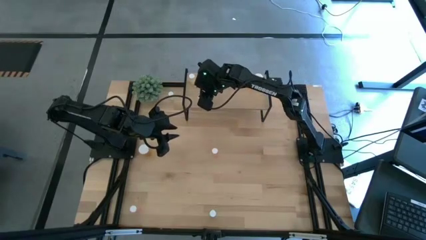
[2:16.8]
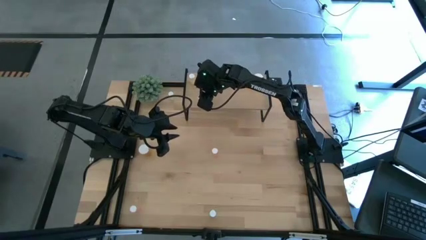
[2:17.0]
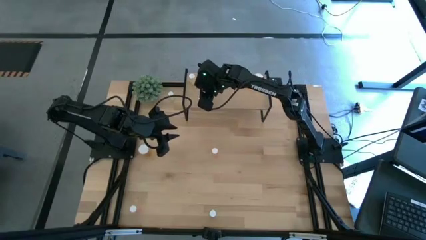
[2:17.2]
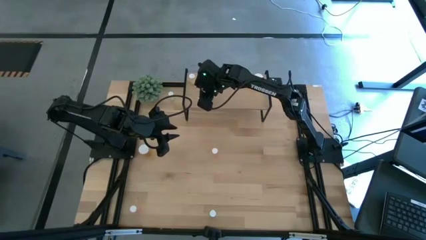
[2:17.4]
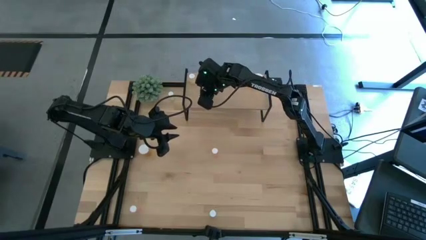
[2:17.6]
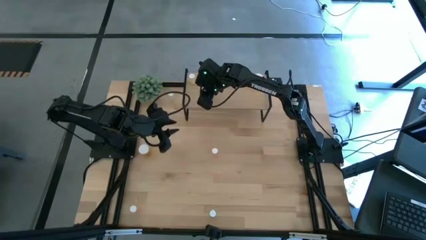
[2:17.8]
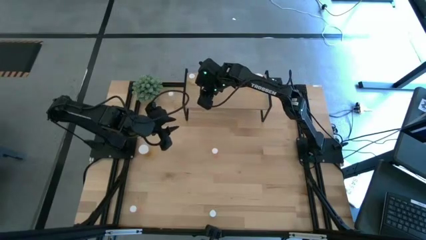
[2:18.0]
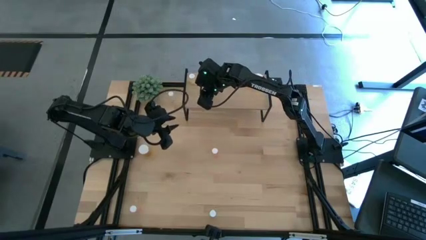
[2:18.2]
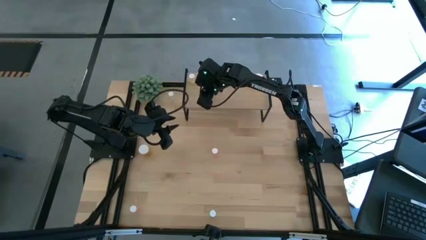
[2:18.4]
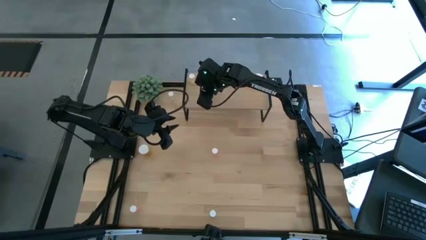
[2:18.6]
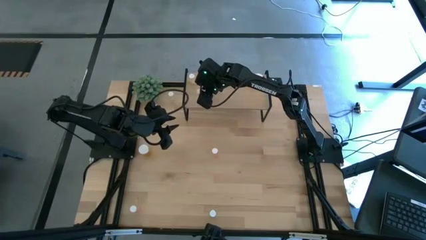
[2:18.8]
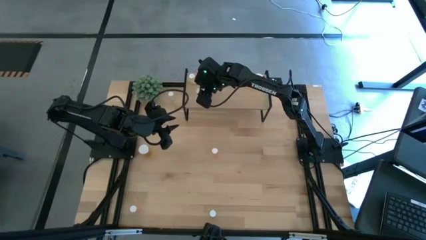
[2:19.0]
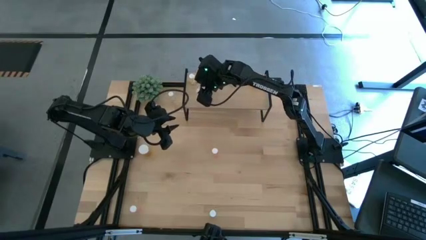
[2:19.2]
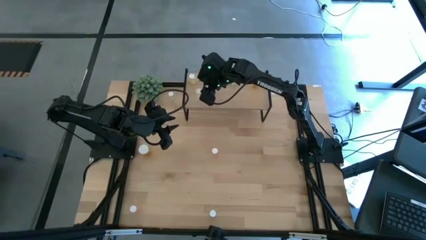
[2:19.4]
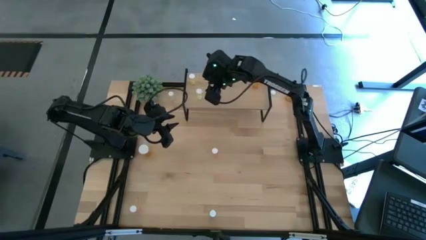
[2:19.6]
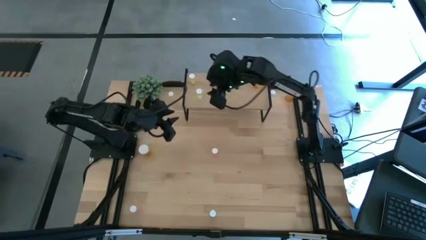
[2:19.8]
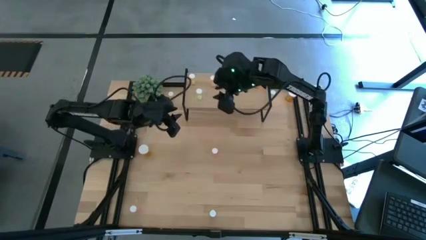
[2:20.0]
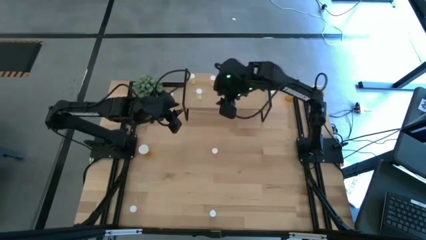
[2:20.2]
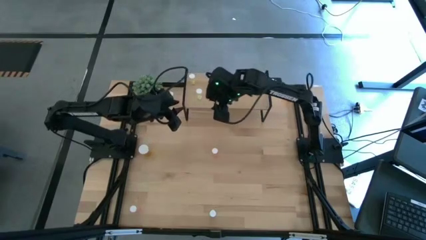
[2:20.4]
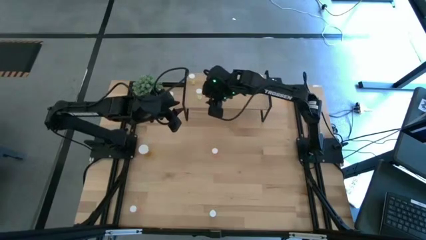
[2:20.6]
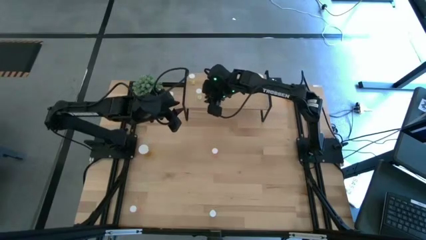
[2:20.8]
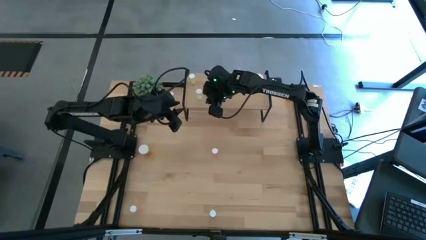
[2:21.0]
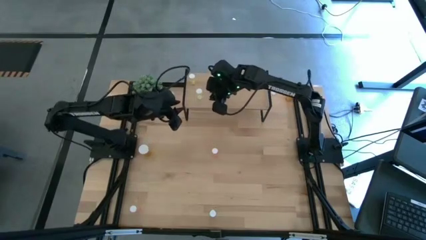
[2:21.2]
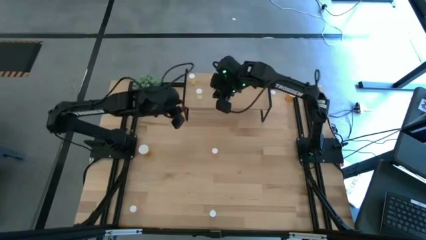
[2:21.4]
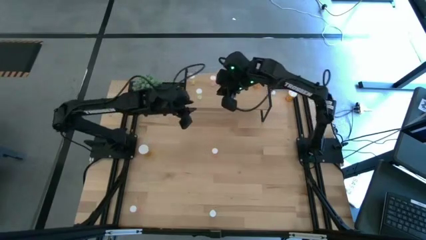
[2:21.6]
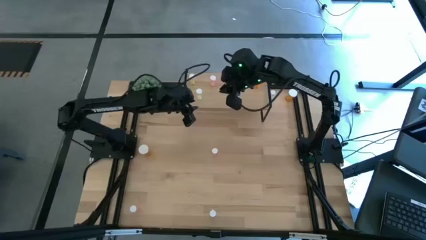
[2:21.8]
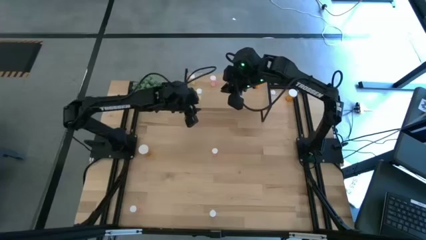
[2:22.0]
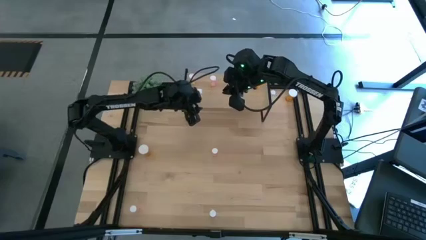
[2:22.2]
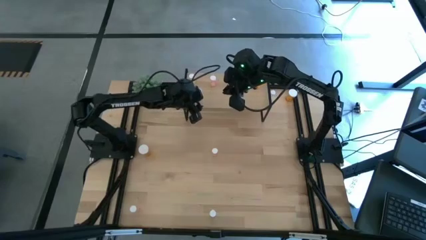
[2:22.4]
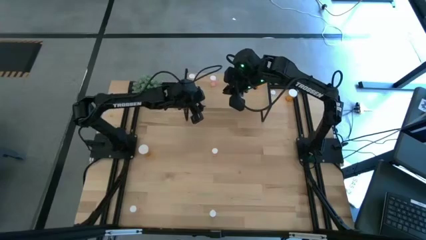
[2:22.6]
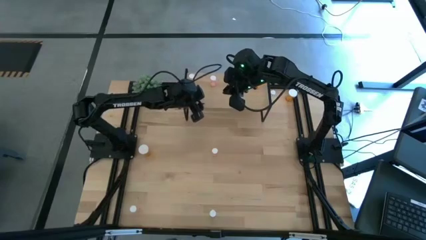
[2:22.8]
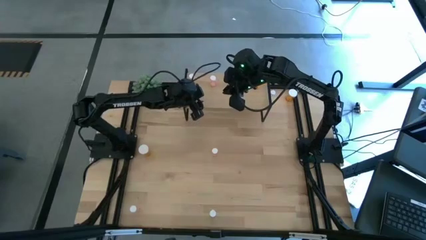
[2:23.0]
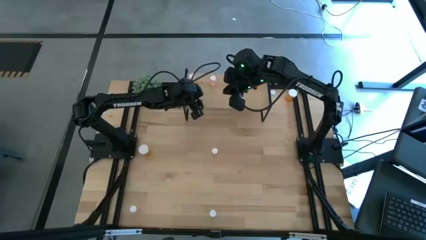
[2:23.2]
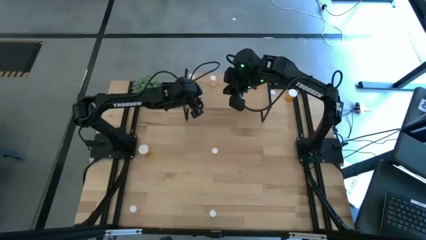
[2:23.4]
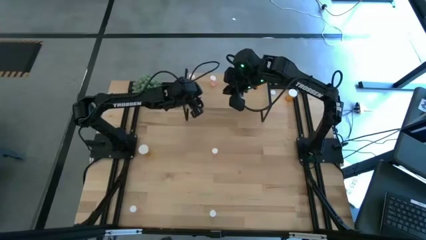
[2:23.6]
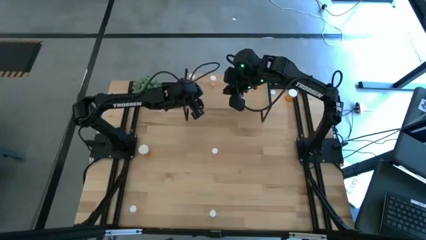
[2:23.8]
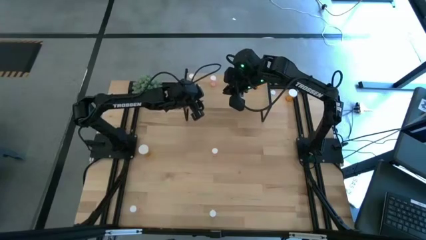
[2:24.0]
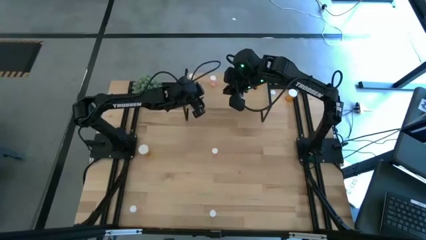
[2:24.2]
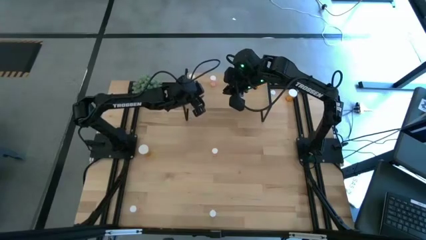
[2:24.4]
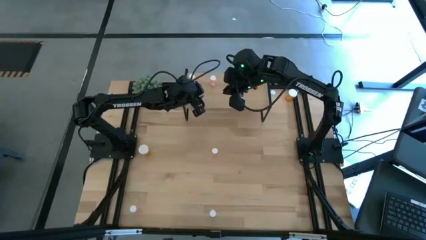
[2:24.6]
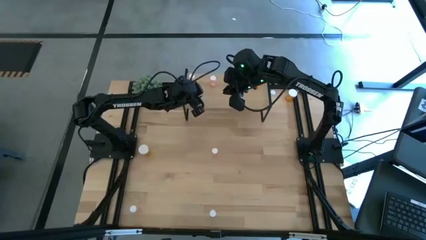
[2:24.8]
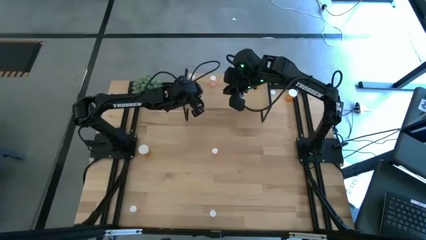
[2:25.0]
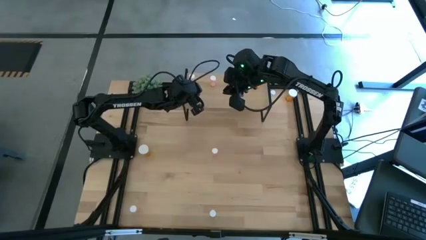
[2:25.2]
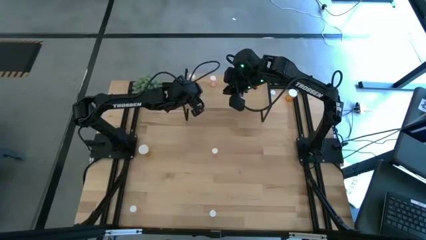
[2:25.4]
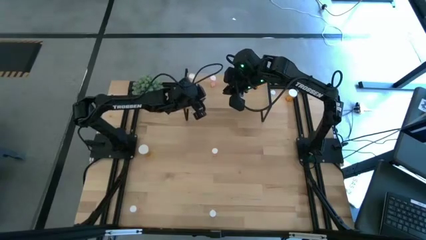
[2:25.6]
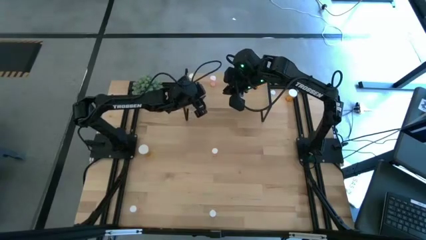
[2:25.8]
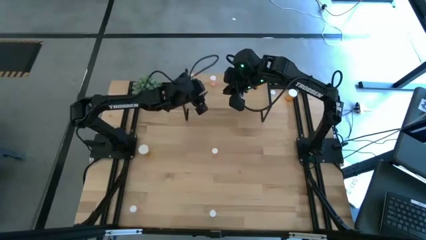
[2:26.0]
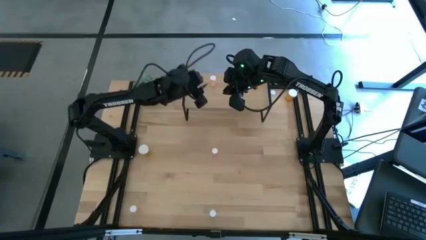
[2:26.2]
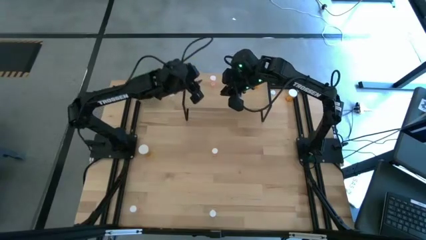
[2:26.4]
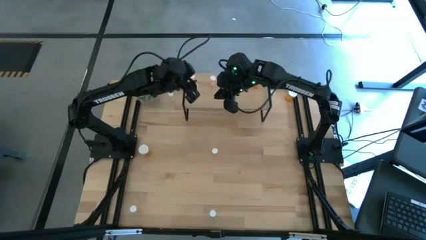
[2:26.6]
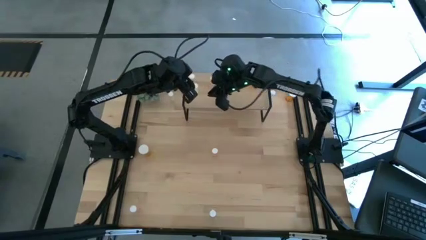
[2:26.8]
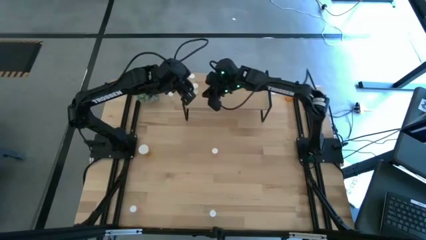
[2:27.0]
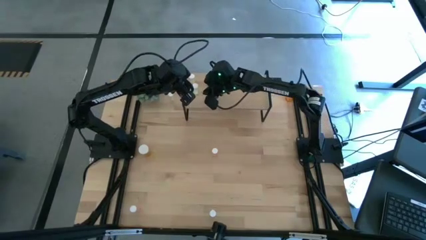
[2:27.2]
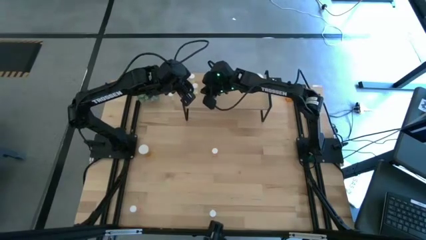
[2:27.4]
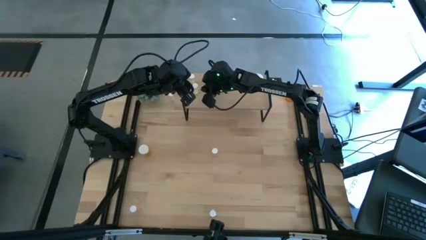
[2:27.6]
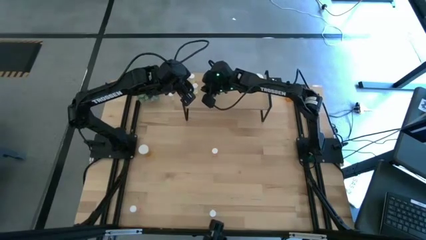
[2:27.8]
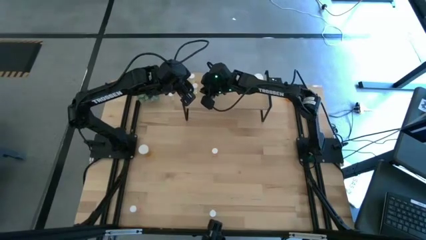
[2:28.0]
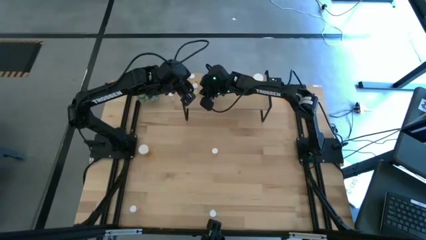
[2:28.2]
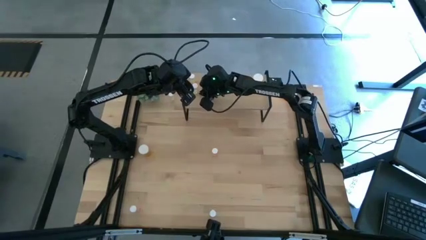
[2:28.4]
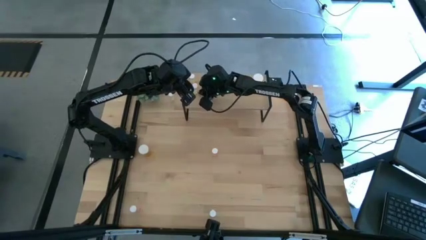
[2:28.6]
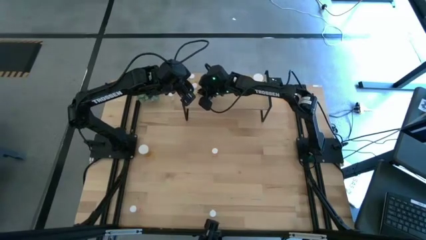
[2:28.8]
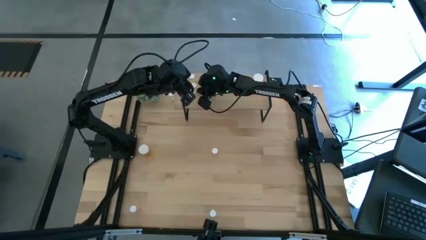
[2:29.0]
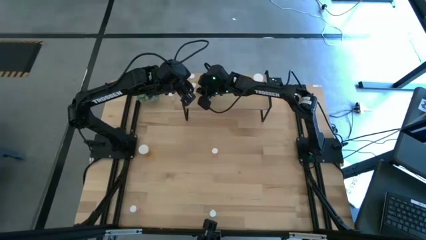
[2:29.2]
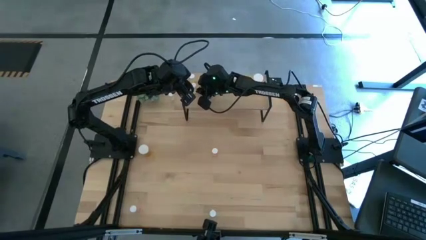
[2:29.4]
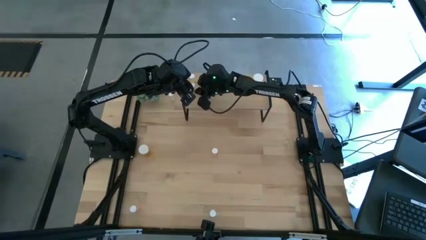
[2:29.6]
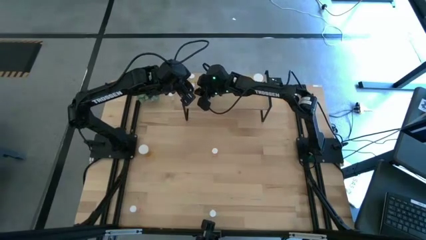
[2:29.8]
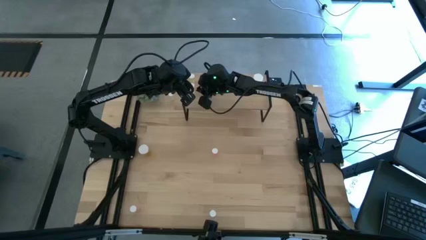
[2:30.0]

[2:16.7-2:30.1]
Task: Pick and place medicine bottles onto shelf by color
Put the bottom yellow pill bottle on the shelf aligned with the other yellow pill bottle

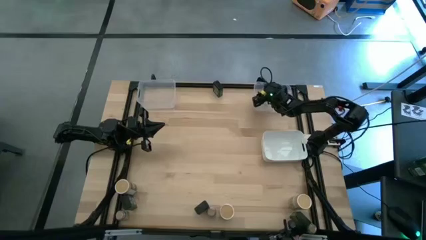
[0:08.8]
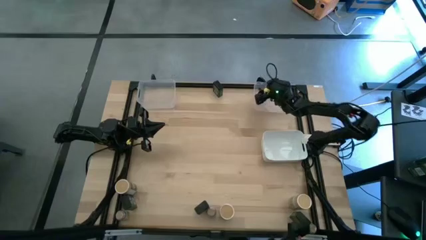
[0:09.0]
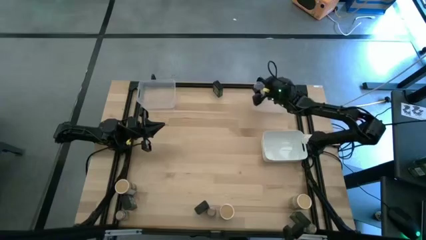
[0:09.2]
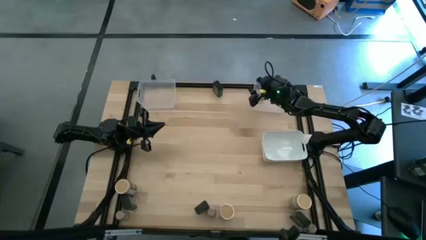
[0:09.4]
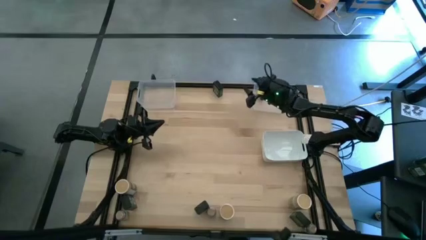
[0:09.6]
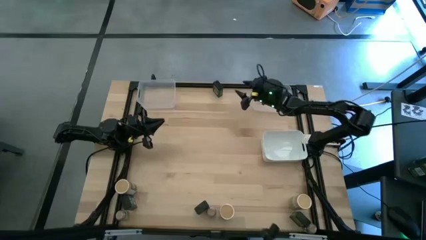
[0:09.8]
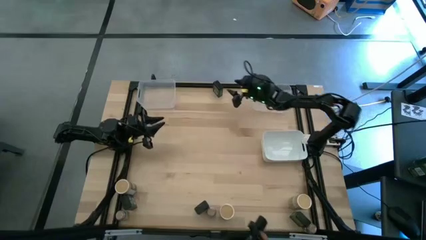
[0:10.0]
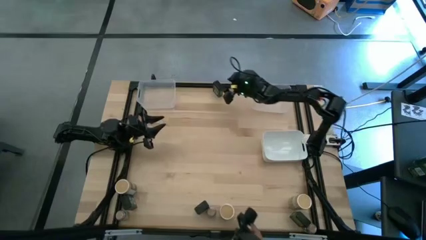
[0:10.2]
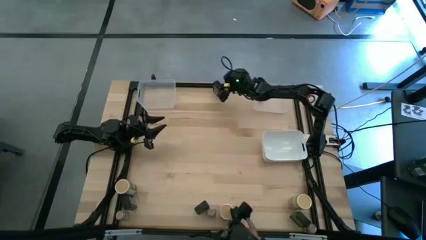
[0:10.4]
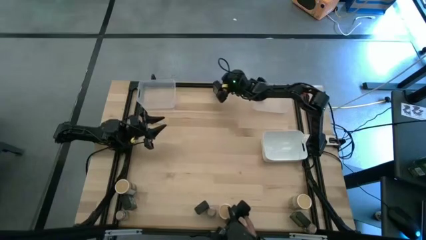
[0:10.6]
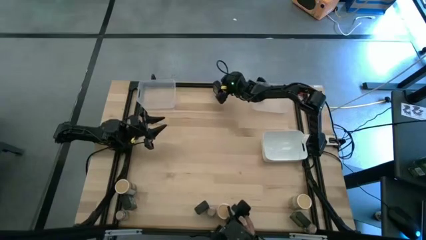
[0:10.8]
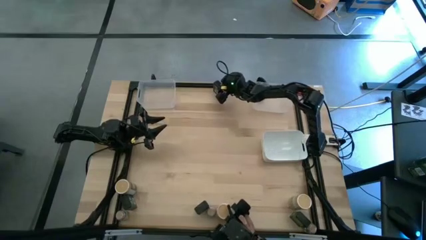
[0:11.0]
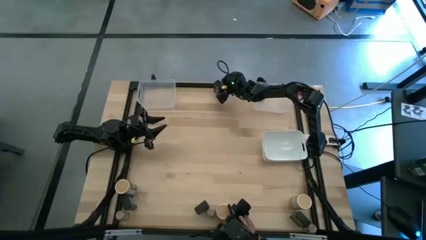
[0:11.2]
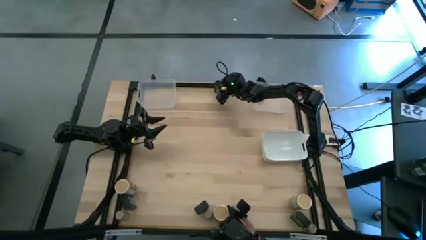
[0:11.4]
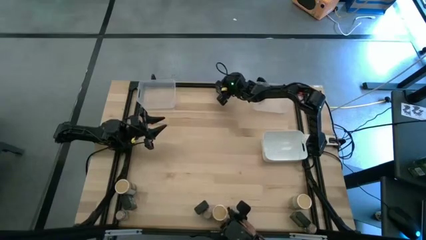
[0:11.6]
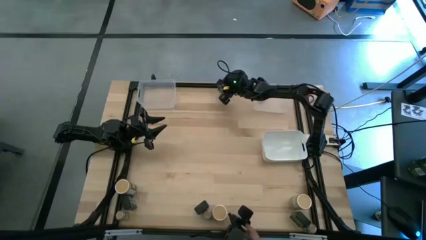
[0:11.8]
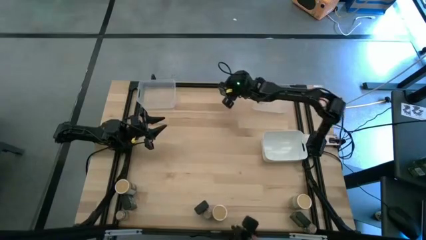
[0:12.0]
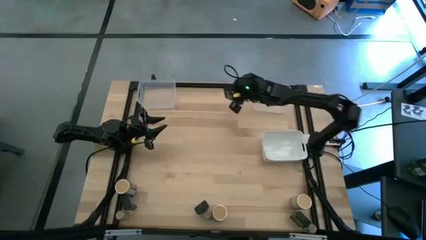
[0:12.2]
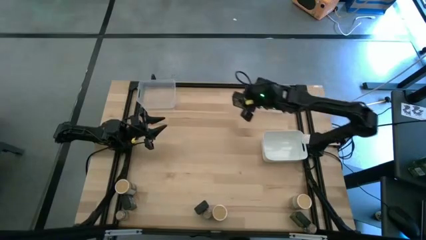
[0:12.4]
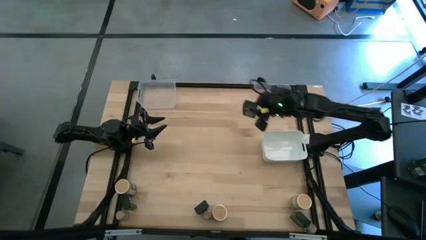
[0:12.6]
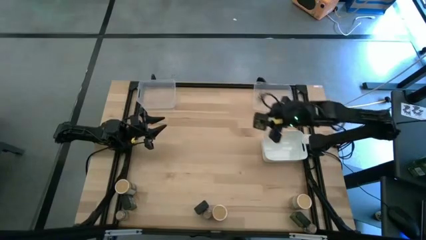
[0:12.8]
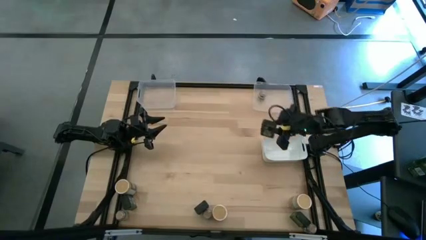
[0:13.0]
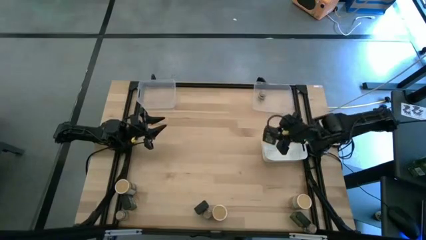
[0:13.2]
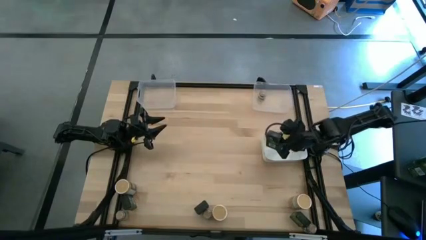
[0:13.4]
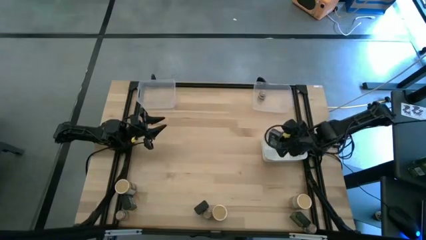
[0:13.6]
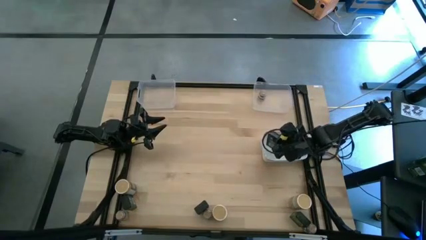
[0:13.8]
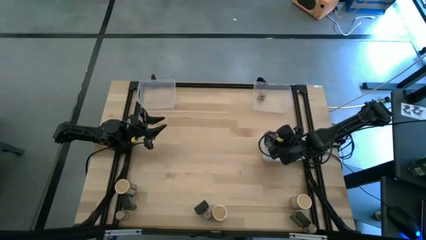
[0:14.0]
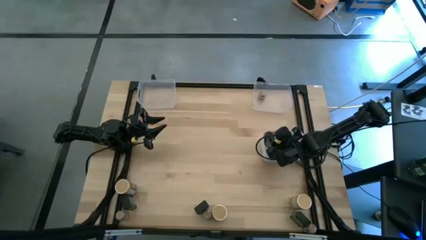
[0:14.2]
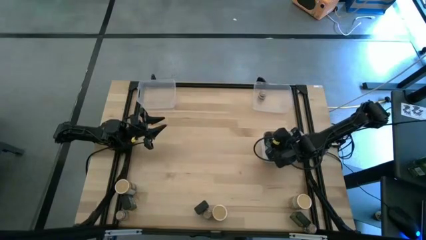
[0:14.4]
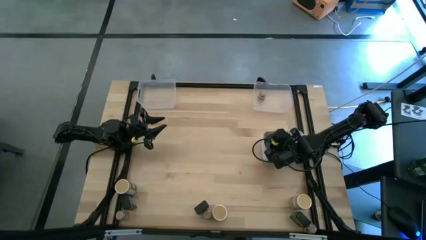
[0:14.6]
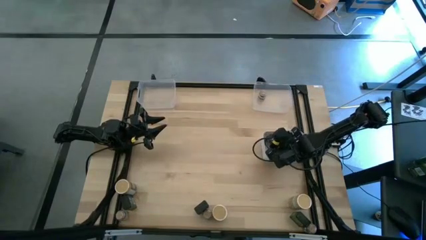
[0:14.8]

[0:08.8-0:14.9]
Task: Sort spices by type
Put the top black seasoning can into the white bin
